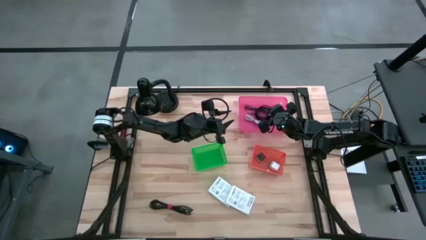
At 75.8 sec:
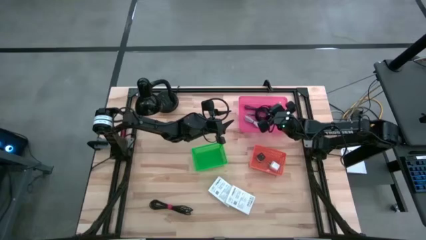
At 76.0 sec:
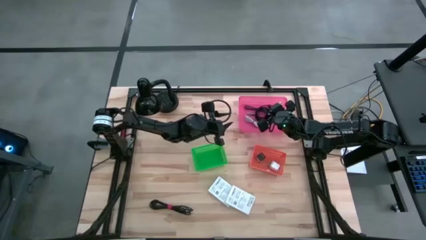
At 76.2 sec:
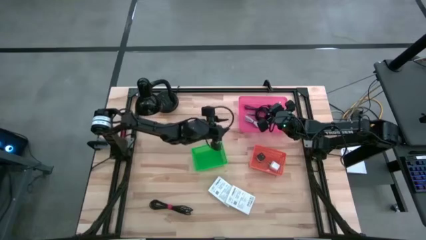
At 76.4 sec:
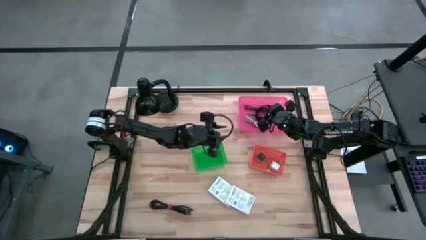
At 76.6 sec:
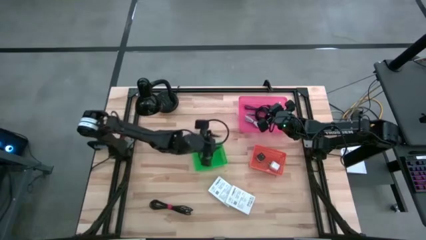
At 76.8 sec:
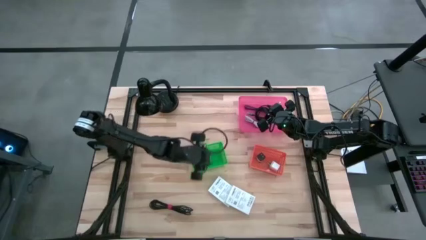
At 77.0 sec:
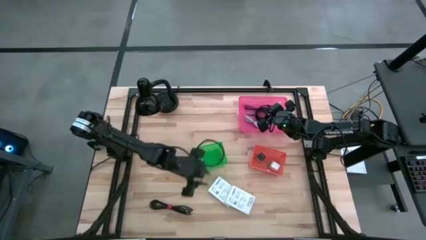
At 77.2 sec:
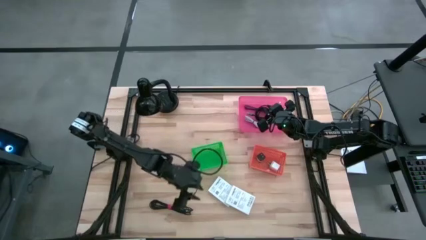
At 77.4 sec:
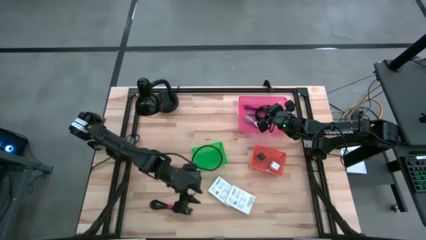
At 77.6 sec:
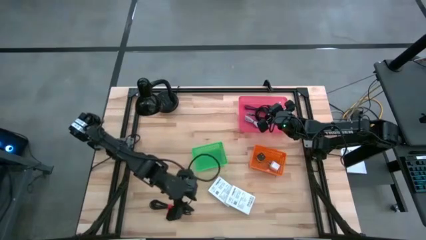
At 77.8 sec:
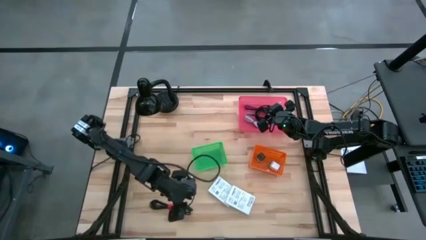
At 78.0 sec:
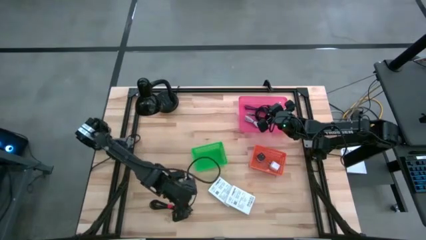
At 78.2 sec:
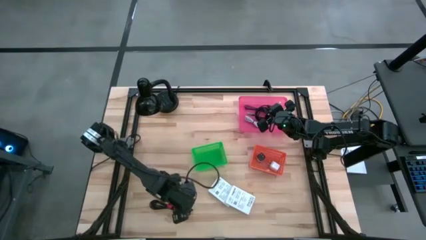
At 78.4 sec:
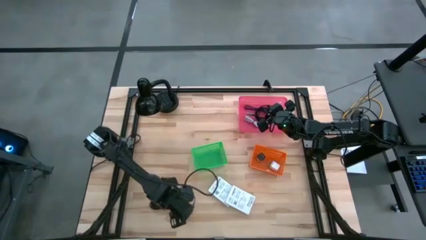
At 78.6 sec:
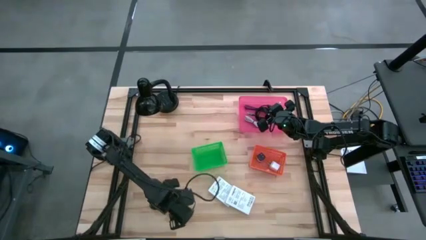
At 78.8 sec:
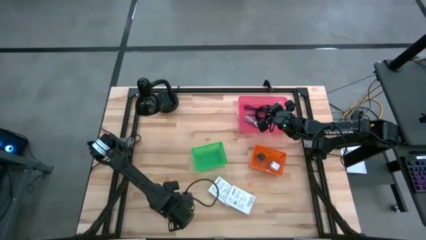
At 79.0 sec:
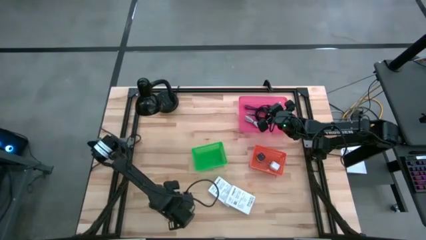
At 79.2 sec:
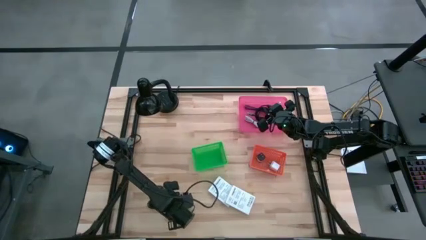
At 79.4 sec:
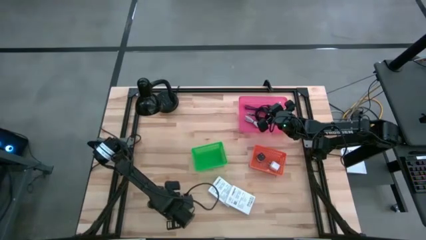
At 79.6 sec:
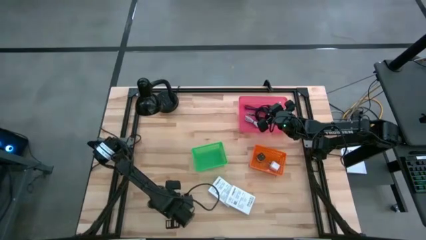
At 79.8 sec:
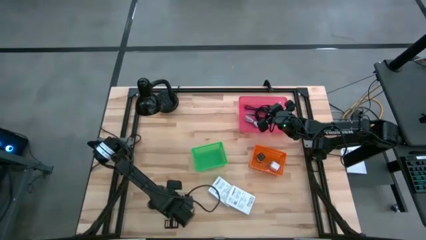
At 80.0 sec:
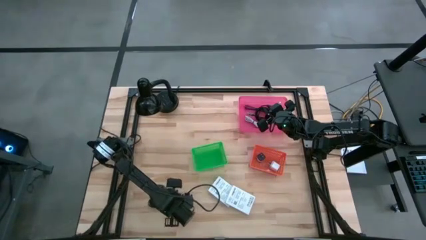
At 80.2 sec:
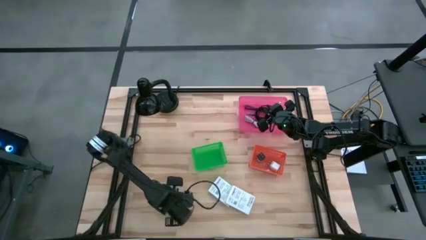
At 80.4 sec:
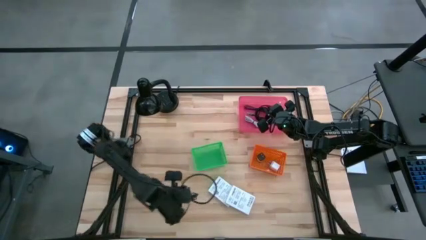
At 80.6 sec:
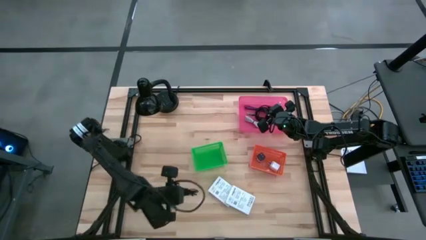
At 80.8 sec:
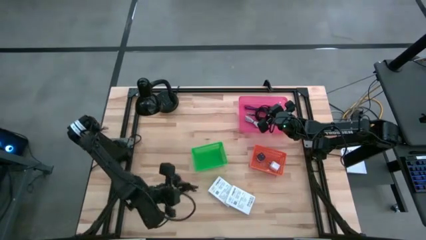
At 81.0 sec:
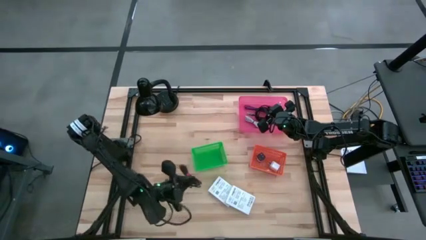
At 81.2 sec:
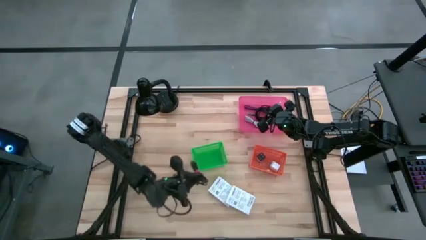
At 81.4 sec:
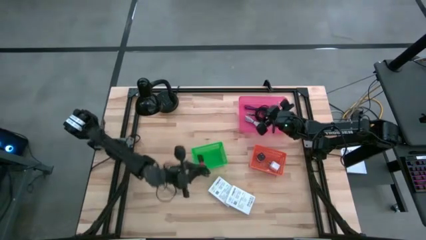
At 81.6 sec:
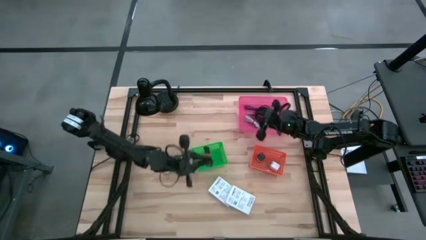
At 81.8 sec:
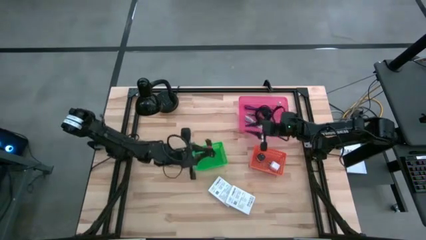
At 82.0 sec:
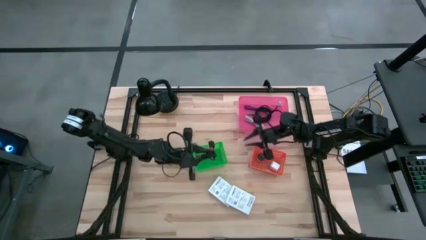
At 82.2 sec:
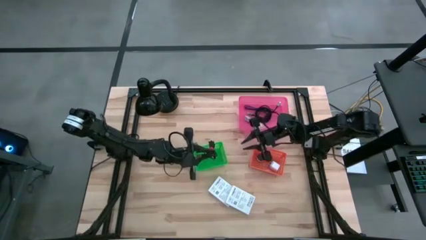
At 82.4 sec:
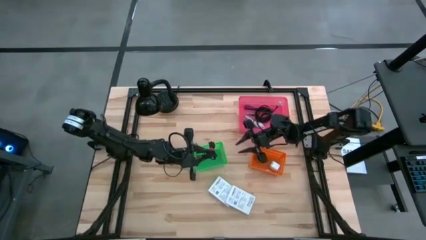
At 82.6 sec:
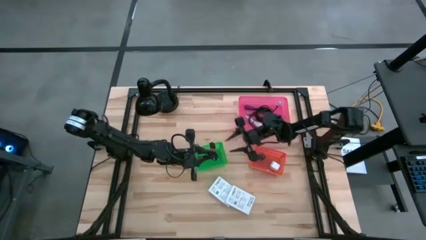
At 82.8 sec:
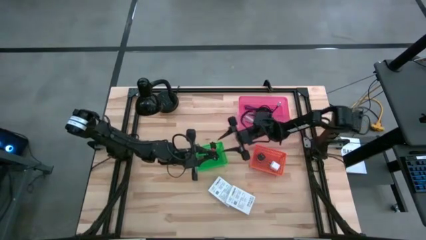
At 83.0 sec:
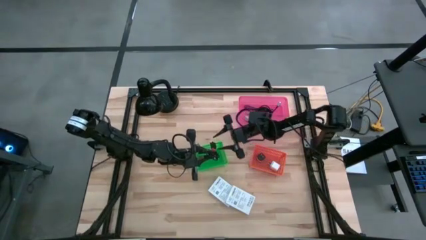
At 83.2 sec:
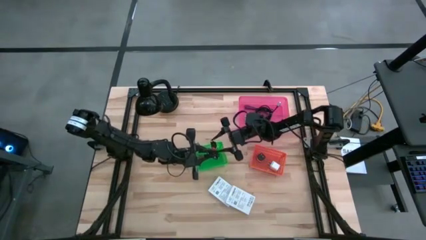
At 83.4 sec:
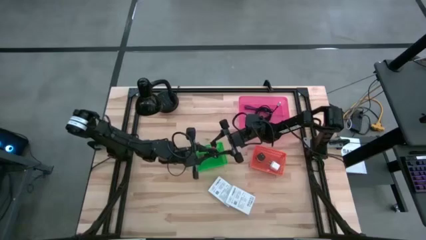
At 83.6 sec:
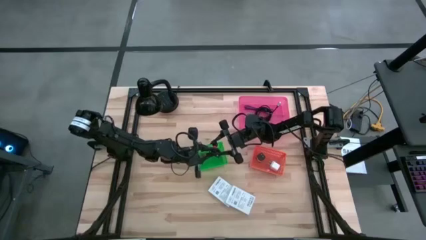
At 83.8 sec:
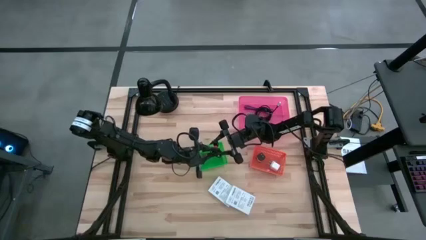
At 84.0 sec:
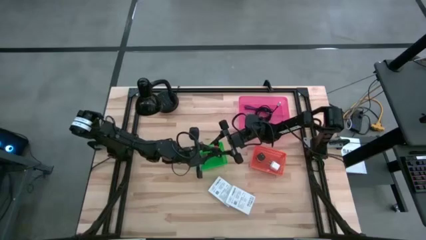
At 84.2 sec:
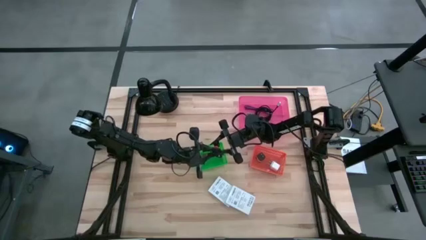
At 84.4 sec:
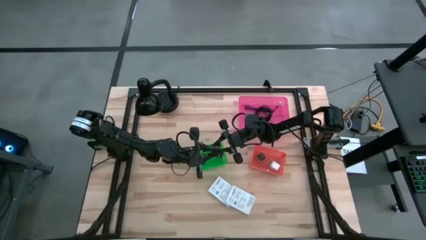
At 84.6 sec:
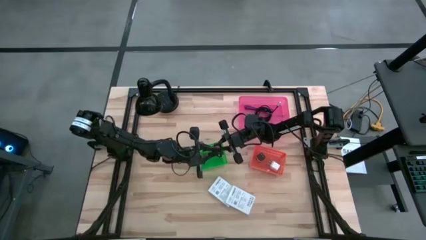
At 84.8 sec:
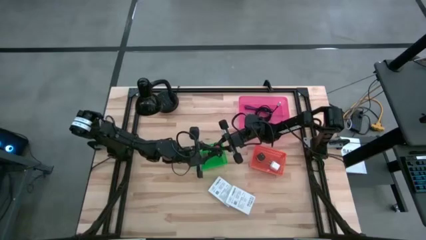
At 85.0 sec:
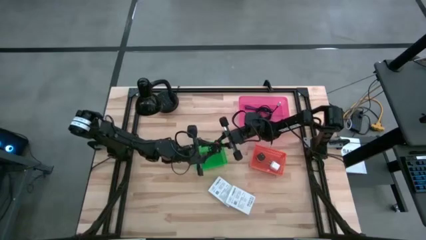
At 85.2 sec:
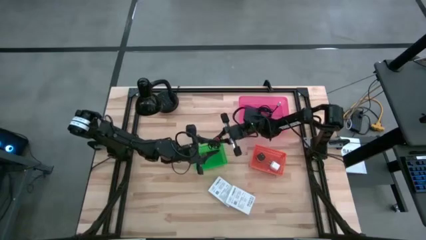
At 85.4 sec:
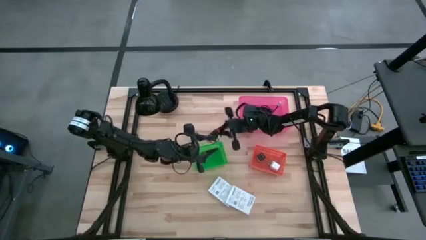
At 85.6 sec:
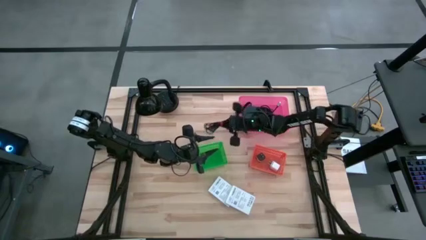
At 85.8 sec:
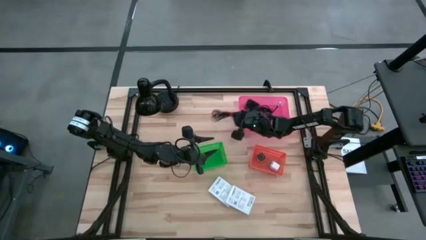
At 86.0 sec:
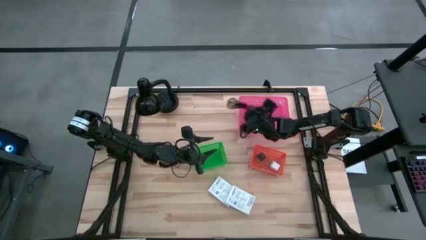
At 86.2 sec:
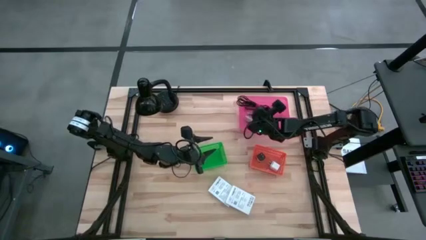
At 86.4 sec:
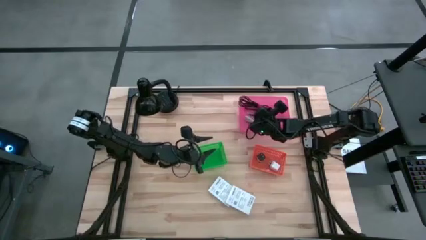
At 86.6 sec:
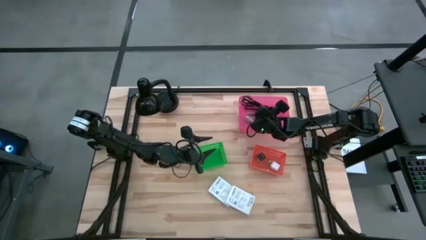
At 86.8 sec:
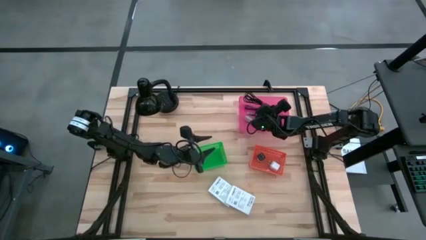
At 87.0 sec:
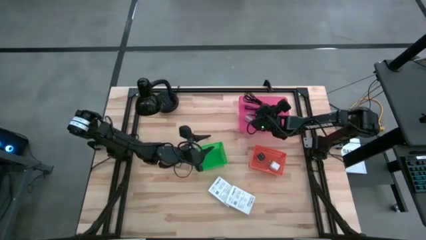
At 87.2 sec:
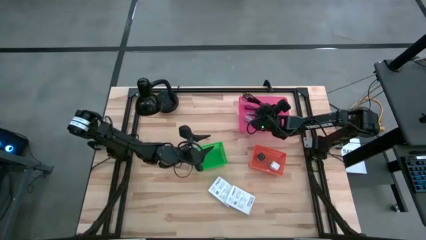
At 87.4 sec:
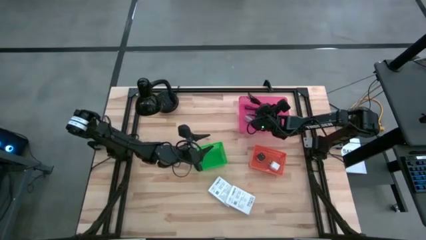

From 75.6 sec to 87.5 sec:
Task: Pick and place items into bin
Put the black charger cable into the pink bin

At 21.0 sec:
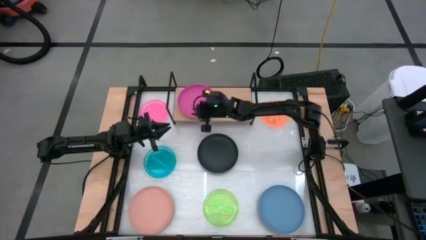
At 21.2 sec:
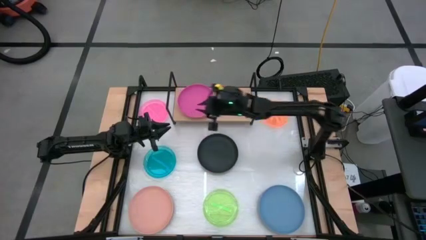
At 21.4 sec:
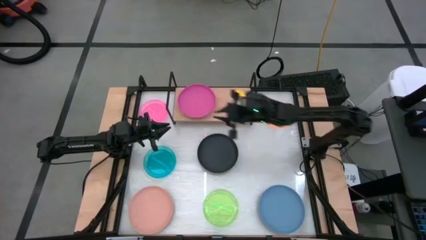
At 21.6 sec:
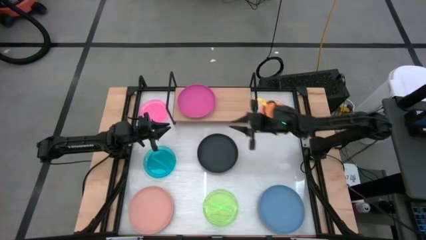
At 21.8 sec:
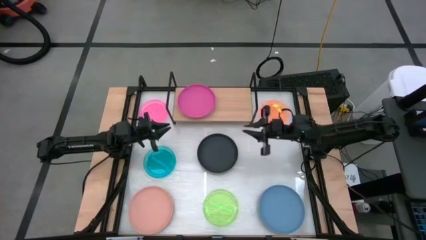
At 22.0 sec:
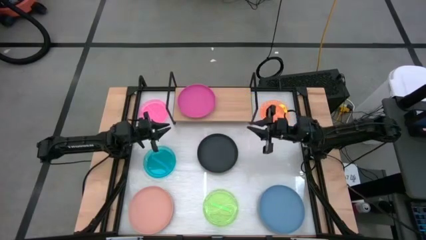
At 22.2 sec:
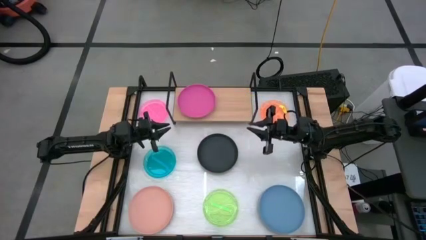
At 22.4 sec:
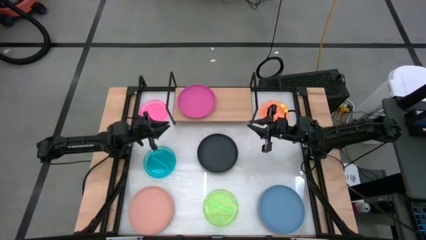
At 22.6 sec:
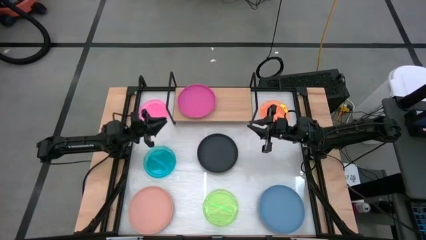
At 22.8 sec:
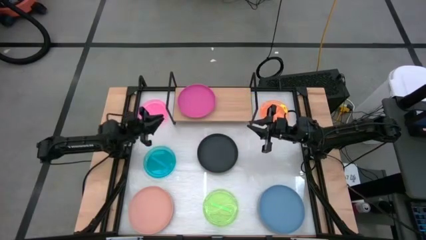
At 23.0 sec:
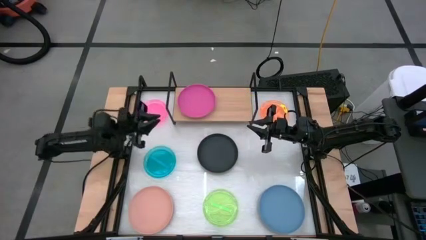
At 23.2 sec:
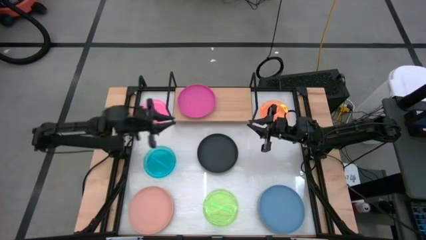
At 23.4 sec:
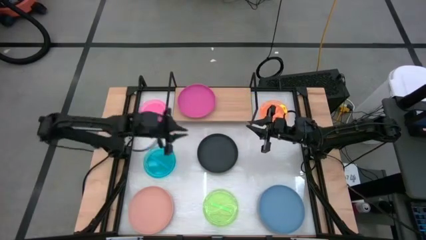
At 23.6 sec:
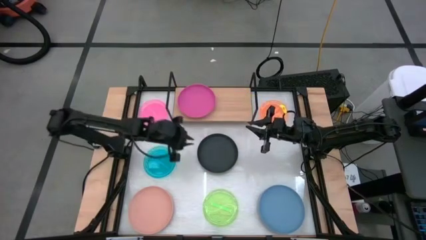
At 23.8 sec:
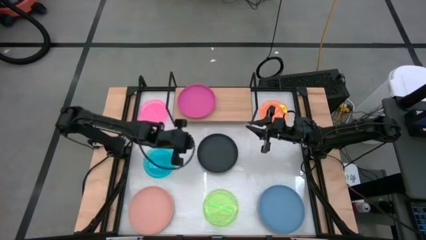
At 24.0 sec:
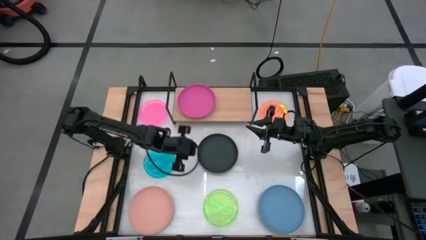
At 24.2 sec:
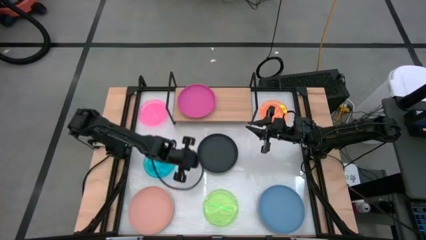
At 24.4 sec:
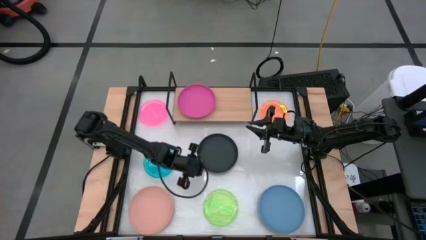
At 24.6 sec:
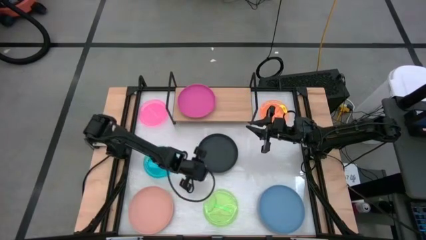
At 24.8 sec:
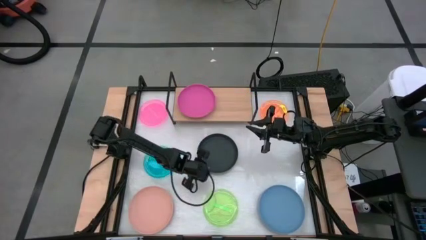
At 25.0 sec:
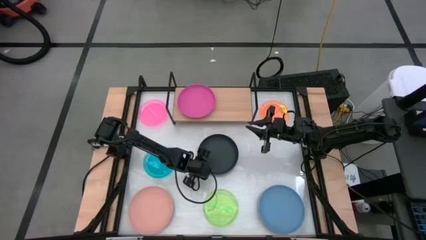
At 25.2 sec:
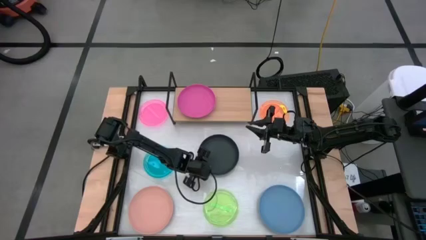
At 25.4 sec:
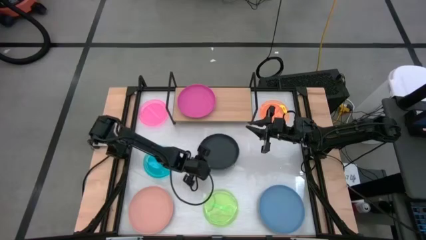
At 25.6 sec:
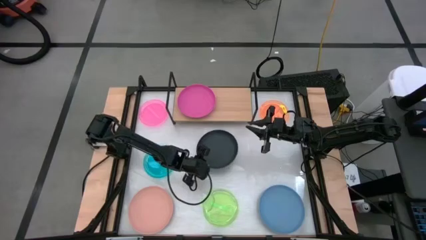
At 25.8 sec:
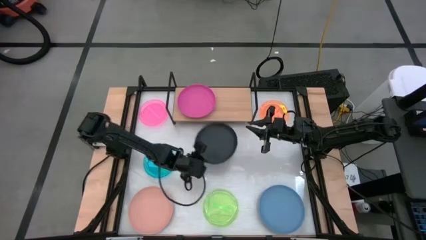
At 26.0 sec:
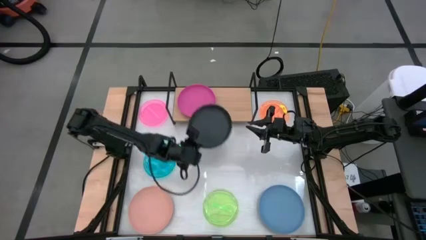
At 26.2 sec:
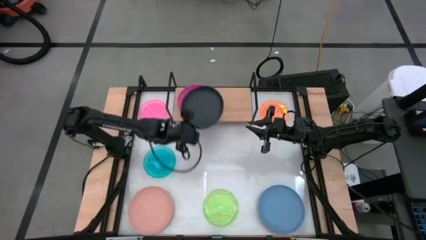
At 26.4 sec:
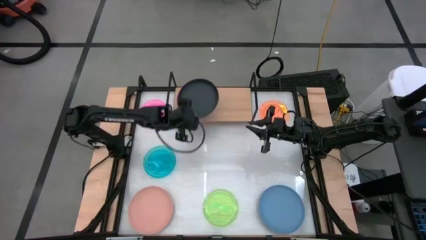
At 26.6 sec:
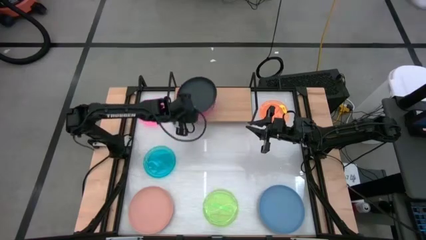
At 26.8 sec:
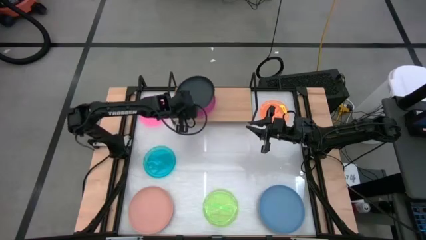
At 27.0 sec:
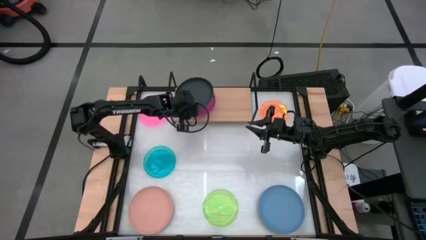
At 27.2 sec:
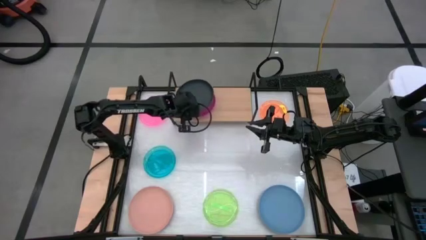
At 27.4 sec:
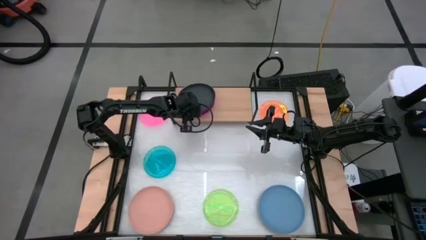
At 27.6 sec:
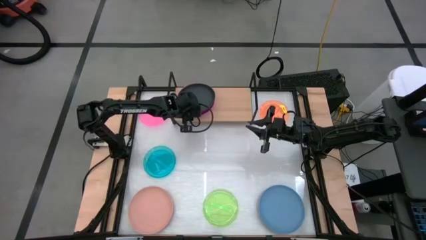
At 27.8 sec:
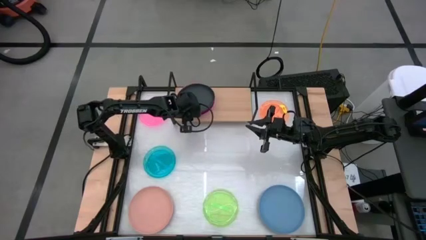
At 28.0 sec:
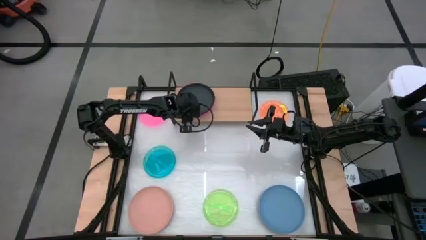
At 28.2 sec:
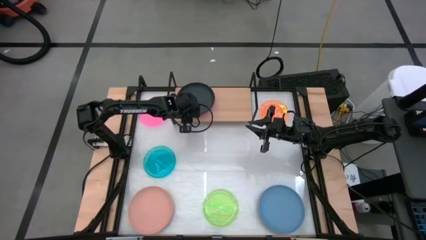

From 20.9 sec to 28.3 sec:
Task: Place and stack plates onto a shelf
Stack the black plate on top of the pink plate on the shelf
